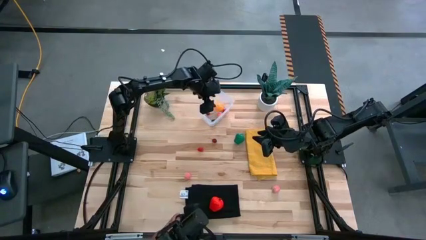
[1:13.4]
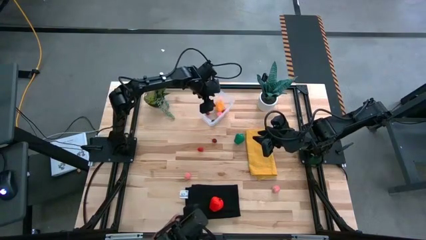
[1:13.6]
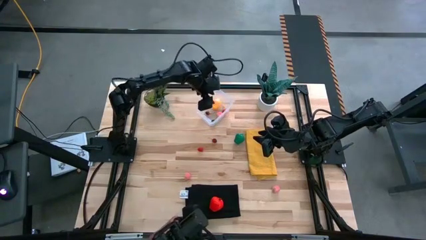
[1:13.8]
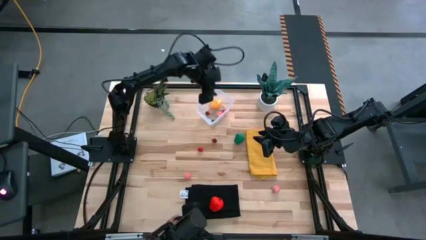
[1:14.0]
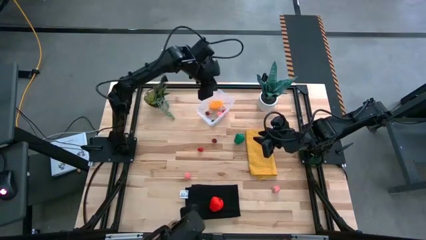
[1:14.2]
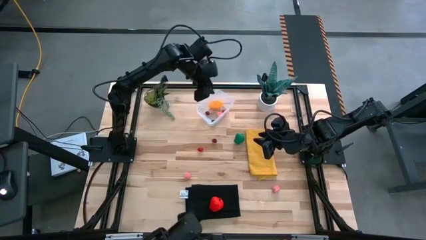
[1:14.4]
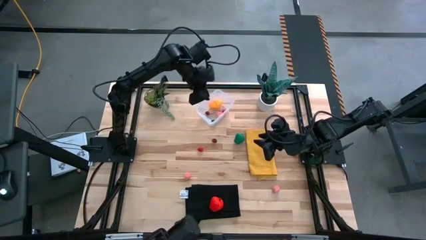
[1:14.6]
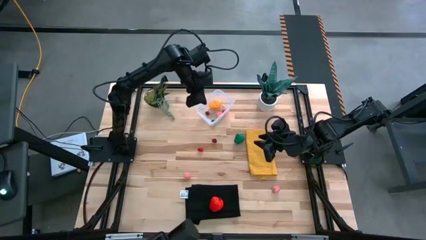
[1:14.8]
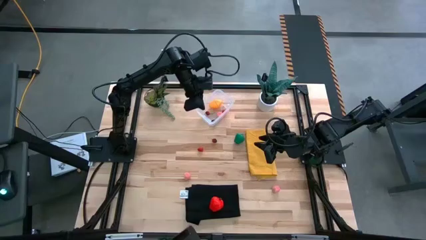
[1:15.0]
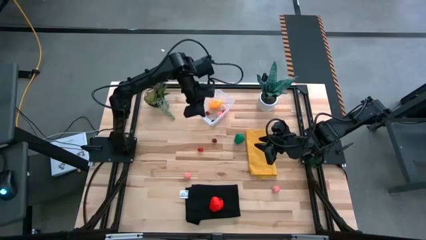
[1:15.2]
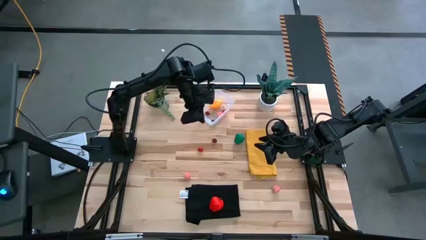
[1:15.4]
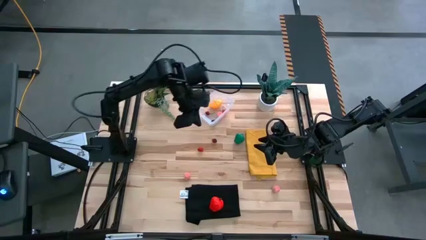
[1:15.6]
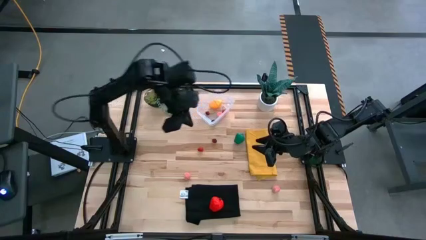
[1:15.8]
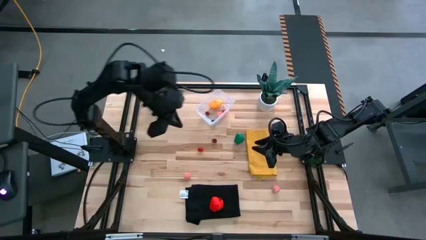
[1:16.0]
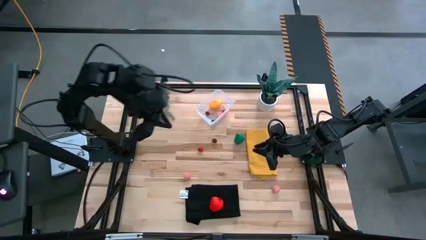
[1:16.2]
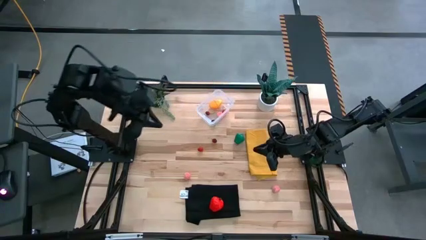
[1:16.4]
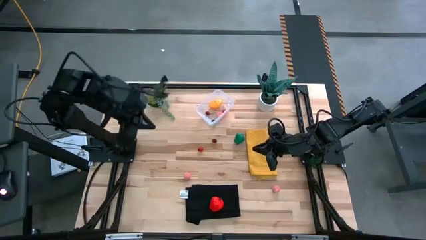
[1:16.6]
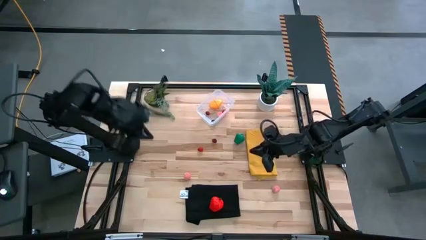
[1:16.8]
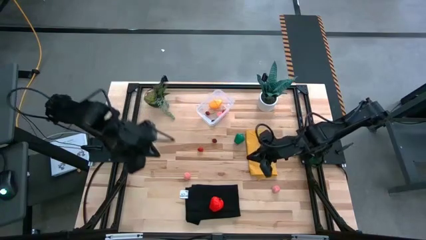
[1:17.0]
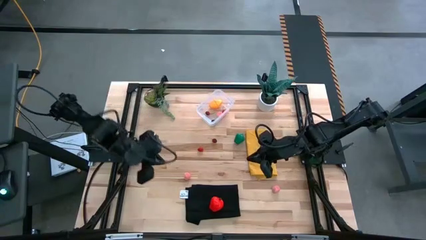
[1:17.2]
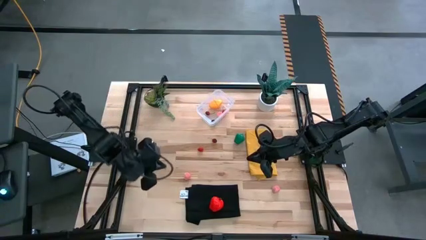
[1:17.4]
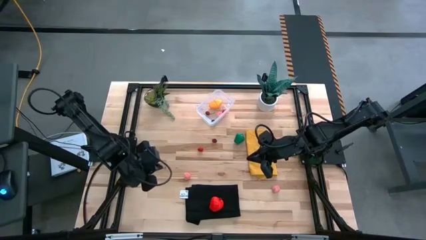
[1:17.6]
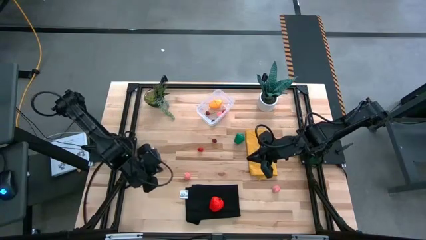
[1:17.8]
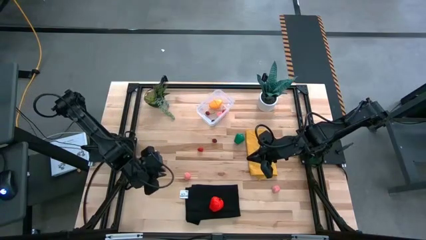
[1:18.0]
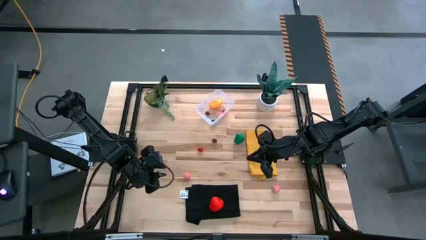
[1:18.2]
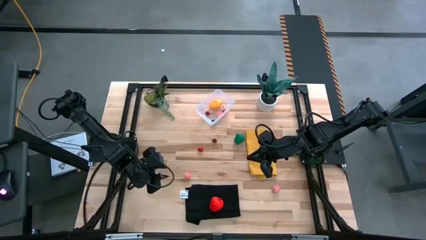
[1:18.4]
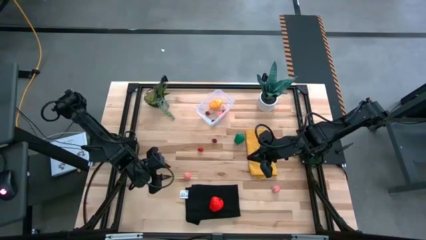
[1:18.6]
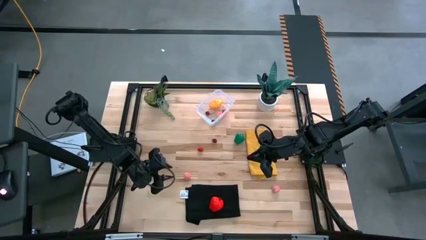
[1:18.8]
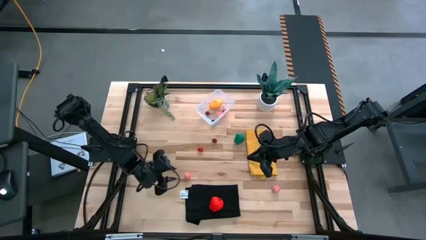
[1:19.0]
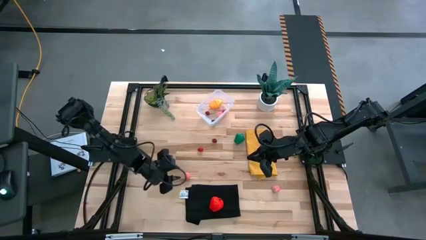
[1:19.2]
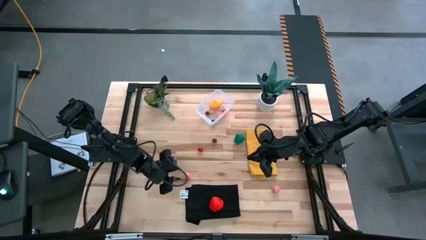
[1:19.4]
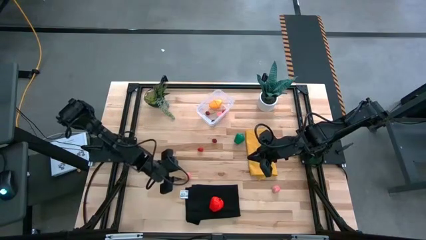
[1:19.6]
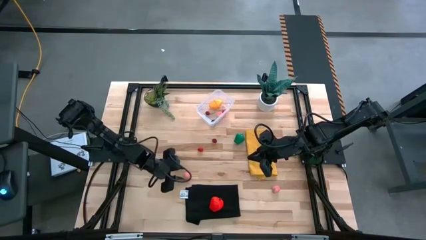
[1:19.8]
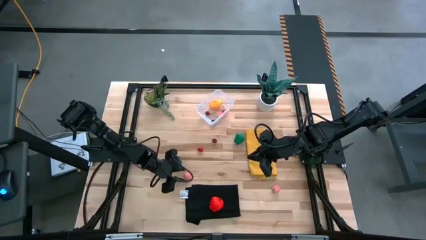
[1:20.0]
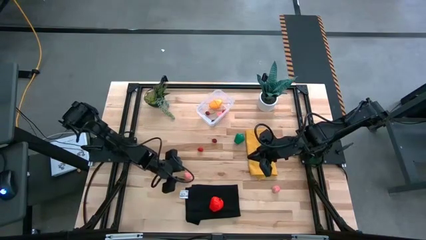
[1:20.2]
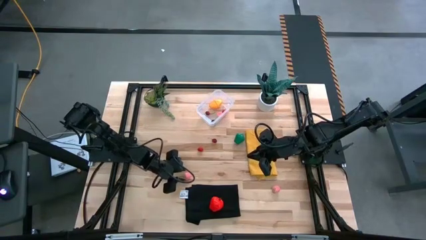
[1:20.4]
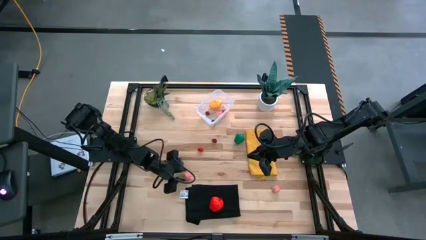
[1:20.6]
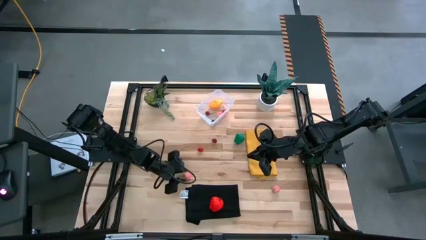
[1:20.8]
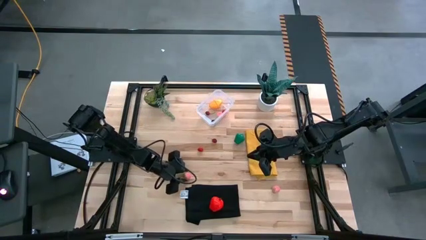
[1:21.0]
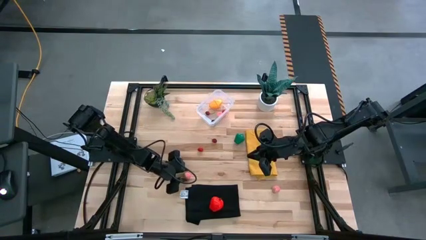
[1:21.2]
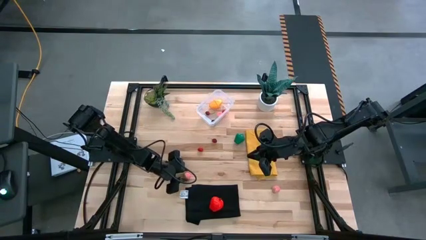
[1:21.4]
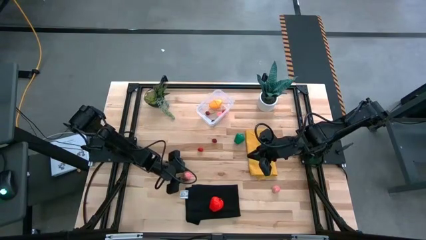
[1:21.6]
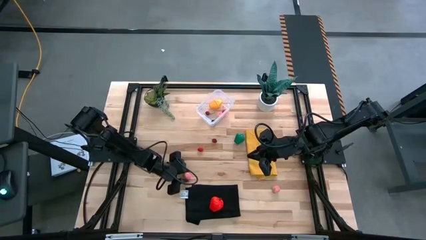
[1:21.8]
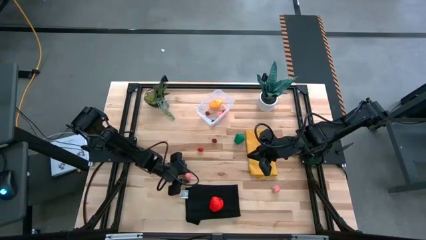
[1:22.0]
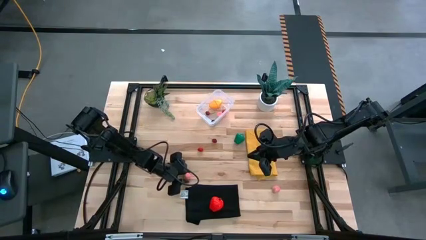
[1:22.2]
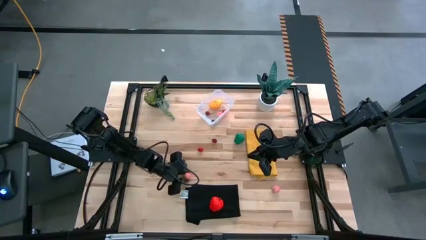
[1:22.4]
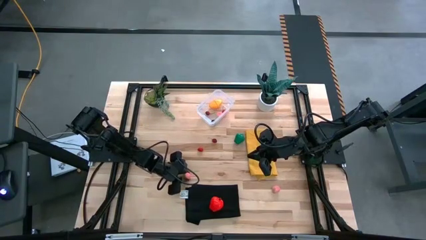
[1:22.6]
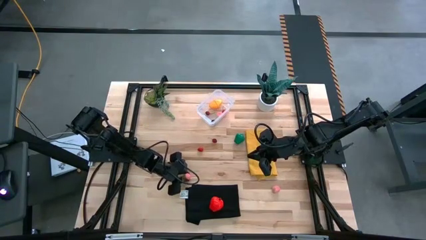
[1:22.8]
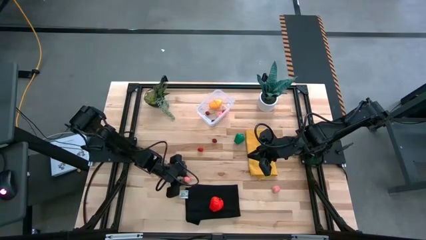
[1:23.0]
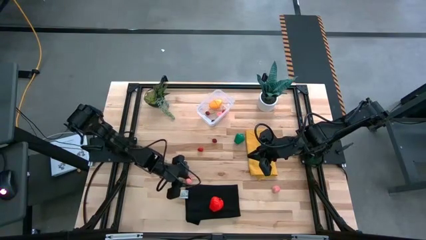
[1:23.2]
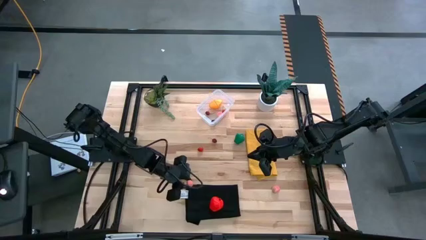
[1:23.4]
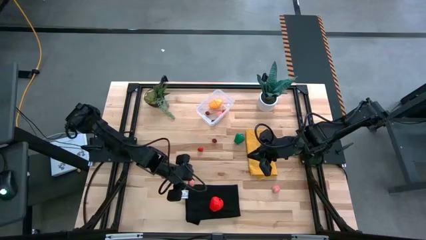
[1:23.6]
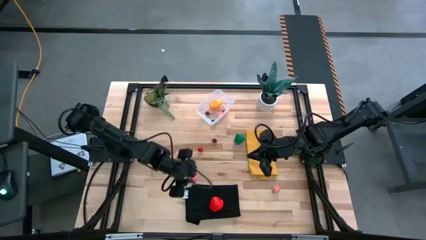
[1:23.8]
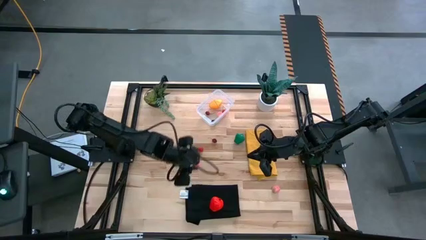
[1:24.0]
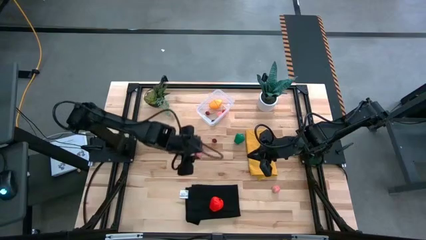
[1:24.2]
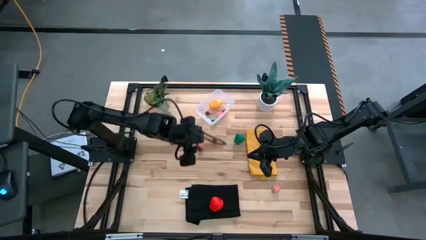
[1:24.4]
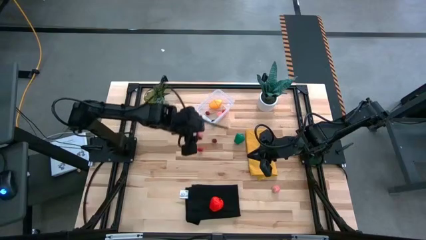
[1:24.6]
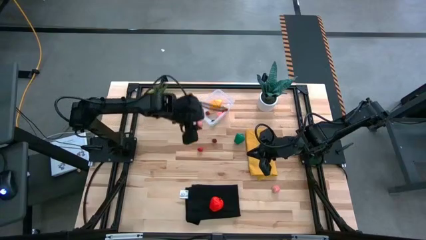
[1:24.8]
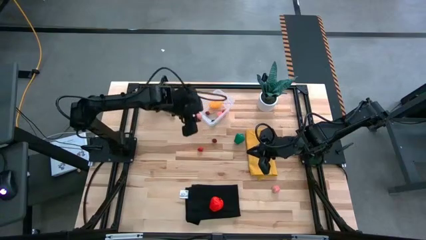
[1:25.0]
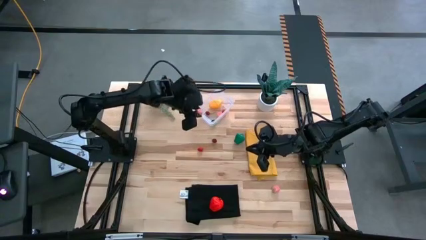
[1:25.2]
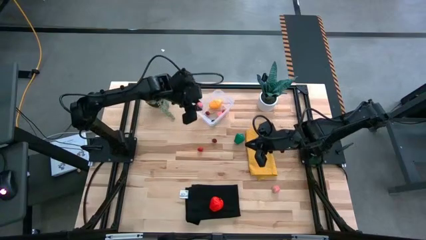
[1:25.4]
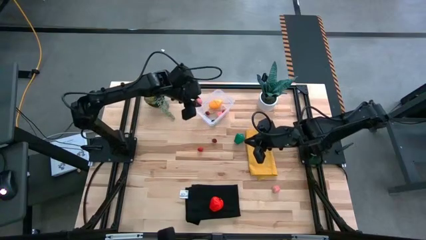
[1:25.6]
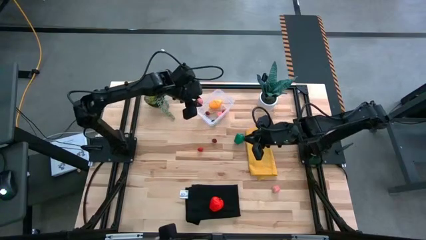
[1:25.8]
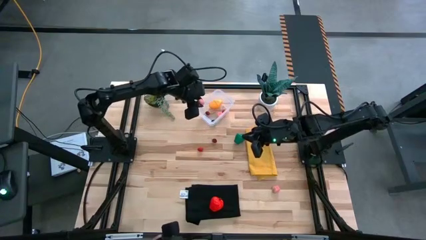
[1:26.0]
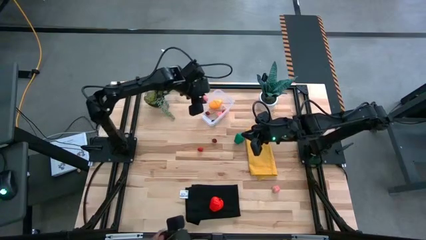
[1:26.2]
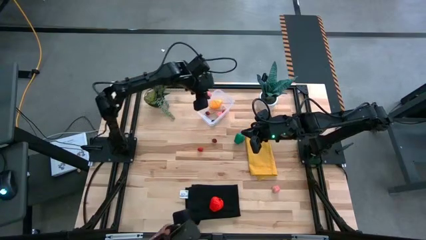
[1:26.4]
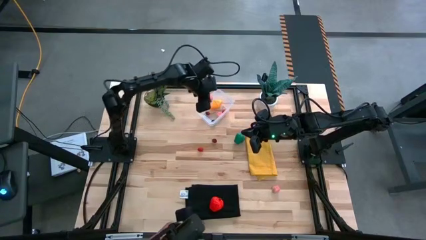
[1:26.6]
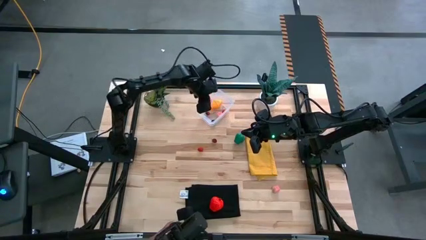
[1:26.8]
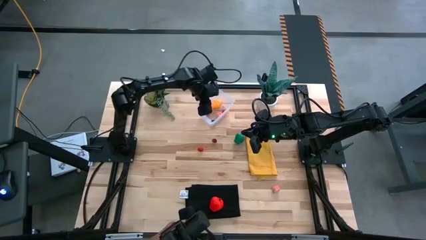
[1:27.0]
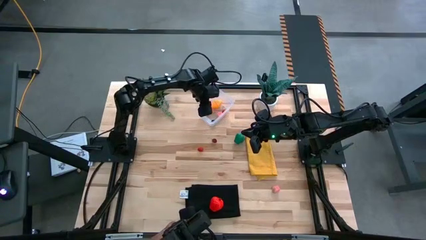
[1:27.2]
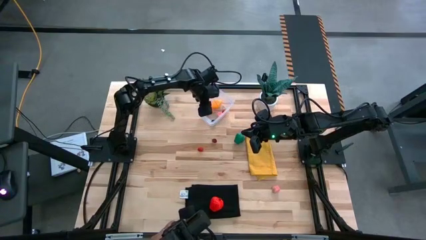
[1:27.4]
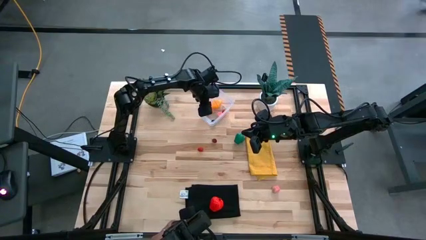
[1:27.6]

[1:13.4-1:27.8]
Task: Pick and placing Produce into tupperware
Put the left pink peach into the transparent bin
